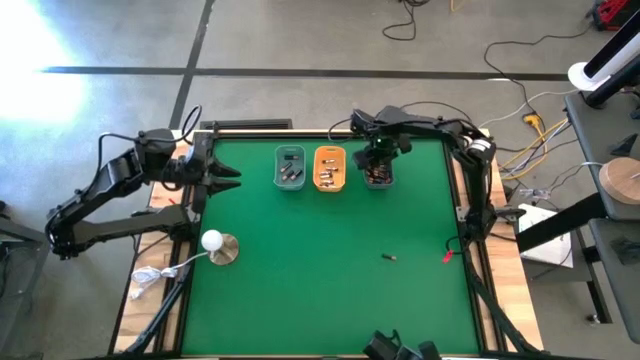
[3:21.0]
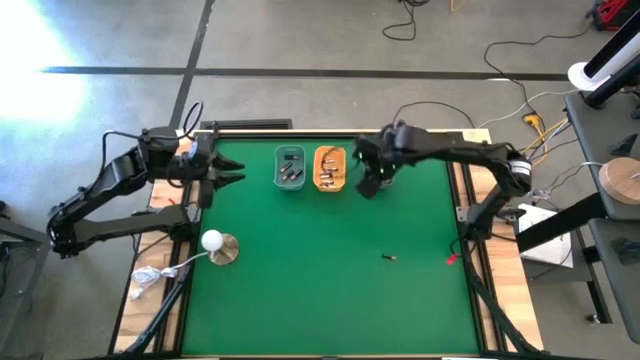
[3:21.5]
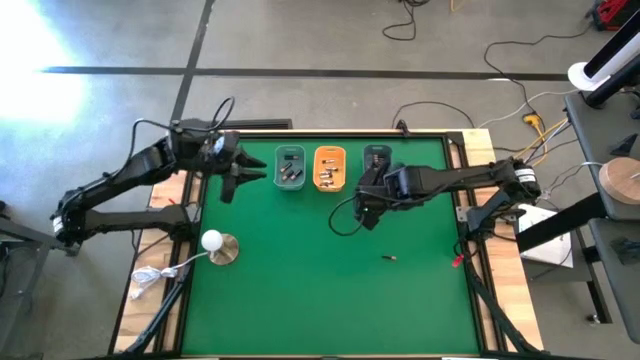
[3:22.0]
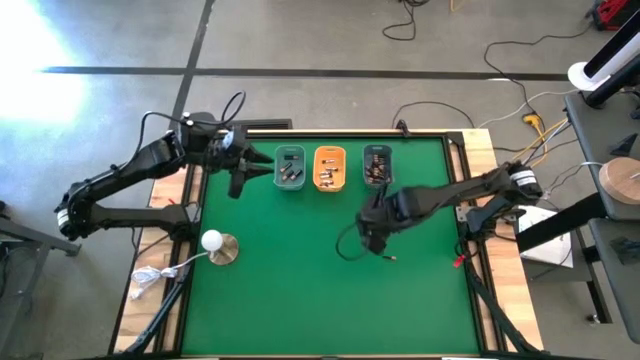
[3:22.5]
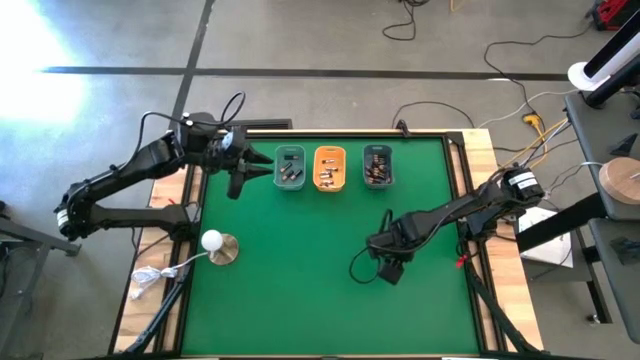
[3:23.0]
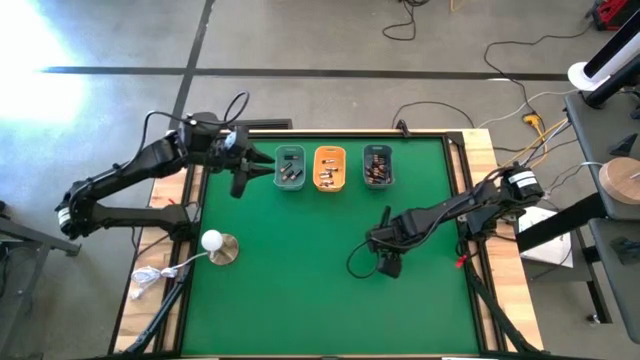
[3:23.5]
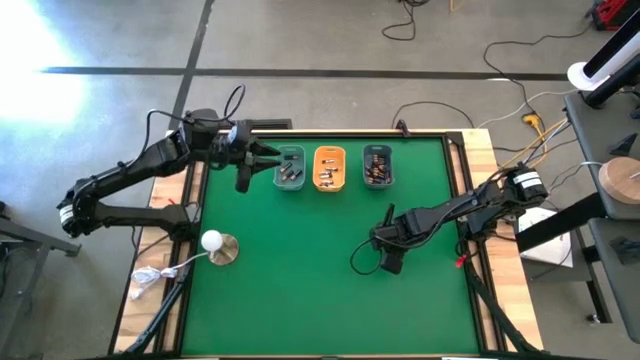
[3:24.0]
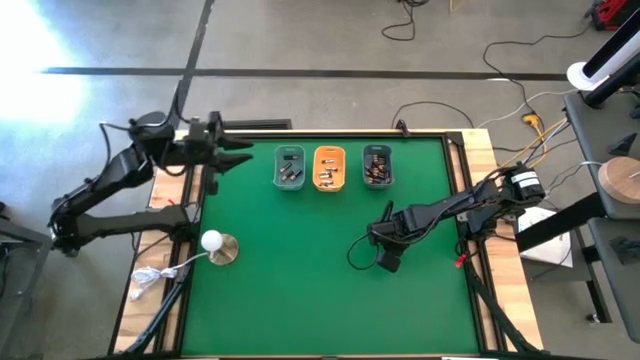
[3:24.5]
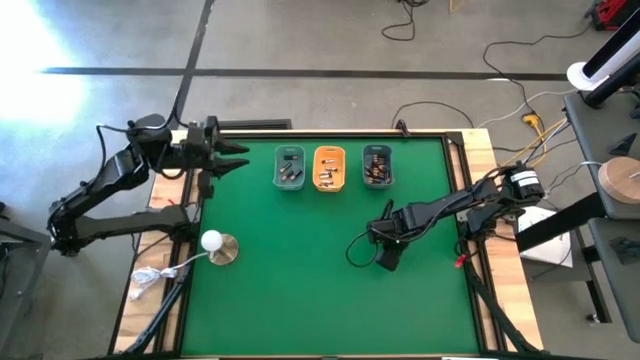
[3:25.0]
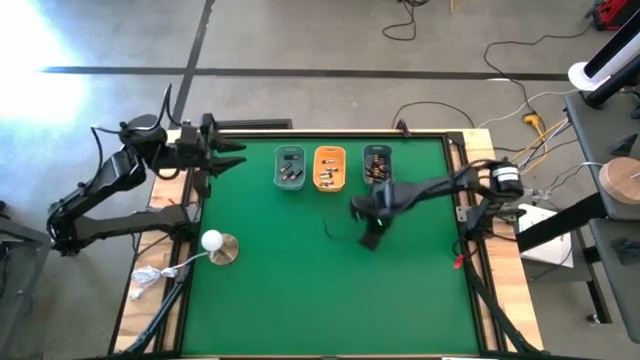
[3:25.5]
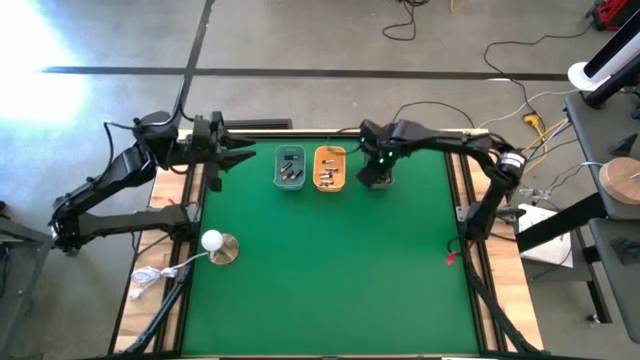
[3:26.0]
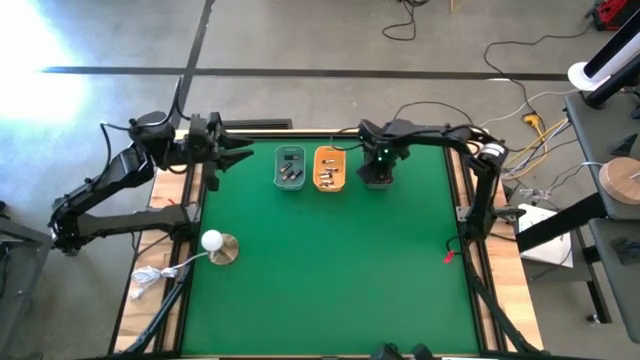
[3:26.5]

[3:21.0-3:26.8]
Task: Sort batteries
Put the small brown battery into the gray bin

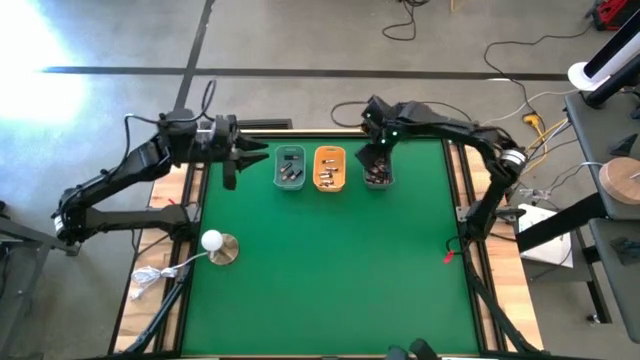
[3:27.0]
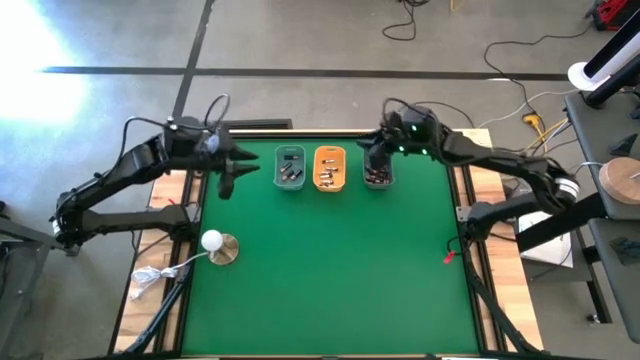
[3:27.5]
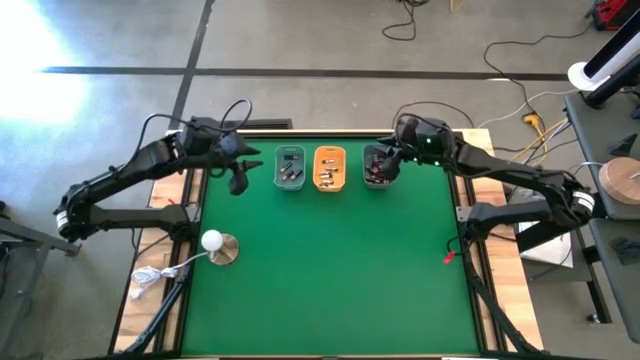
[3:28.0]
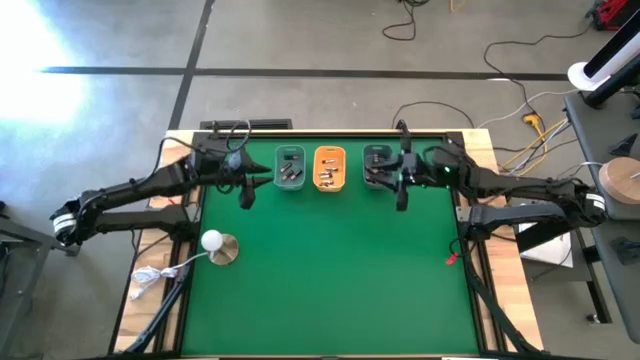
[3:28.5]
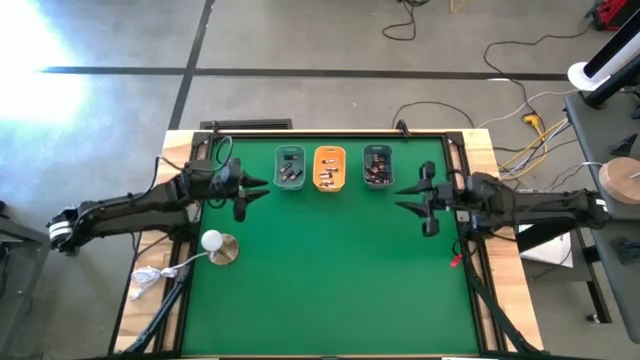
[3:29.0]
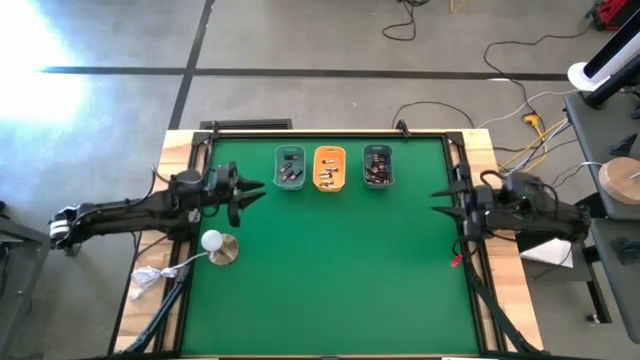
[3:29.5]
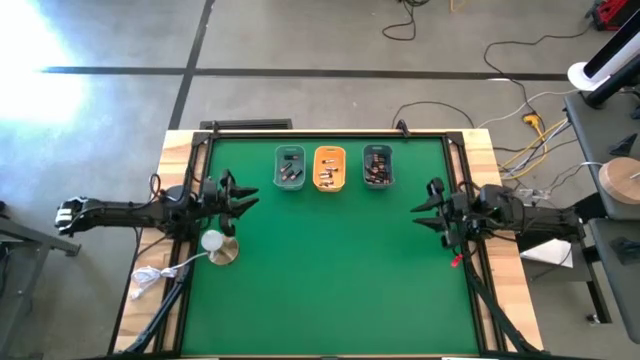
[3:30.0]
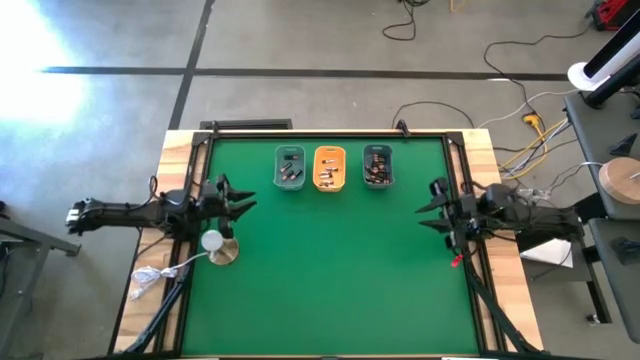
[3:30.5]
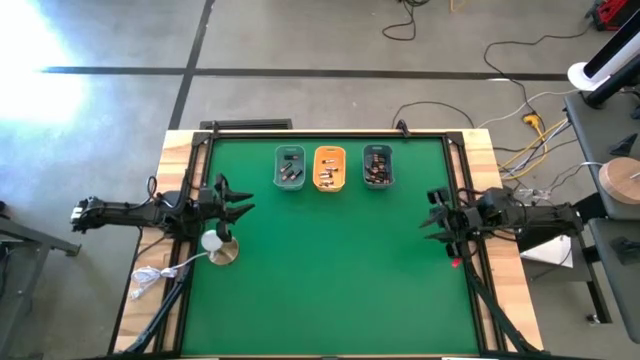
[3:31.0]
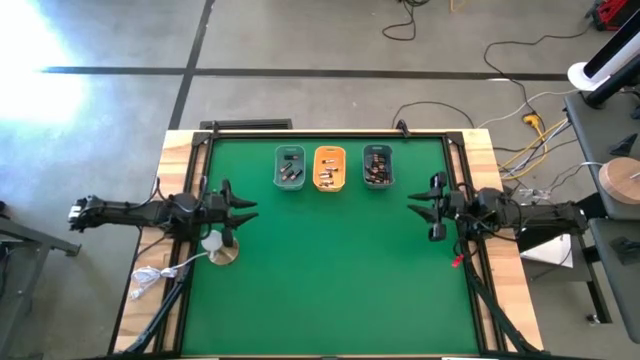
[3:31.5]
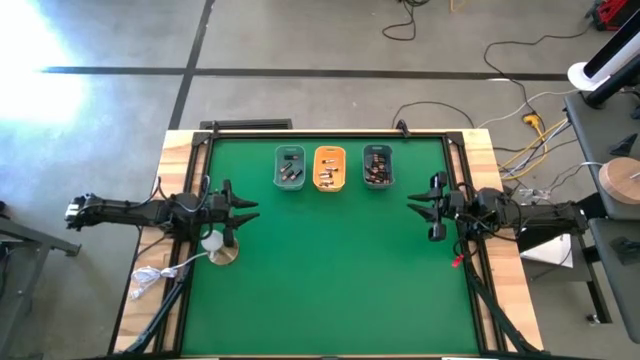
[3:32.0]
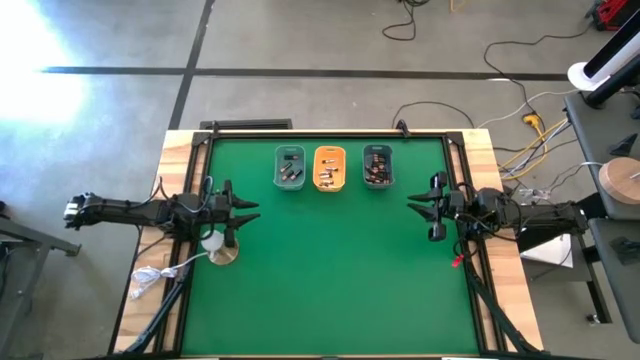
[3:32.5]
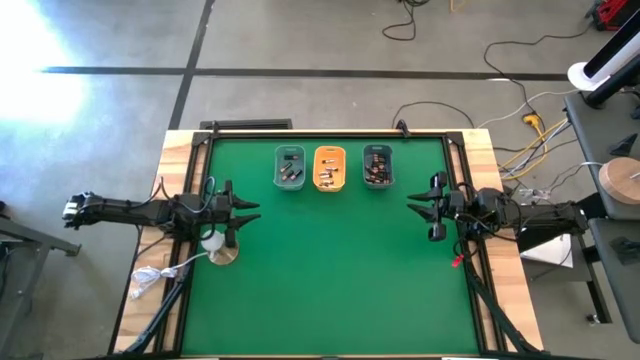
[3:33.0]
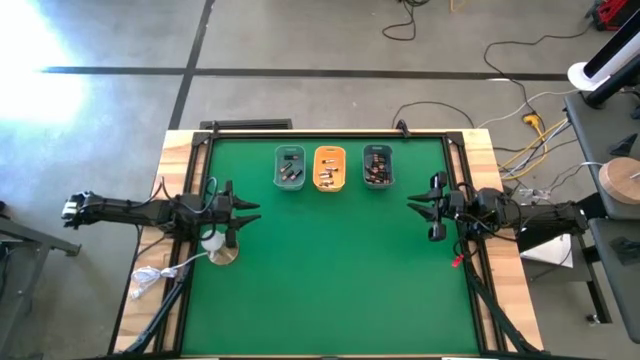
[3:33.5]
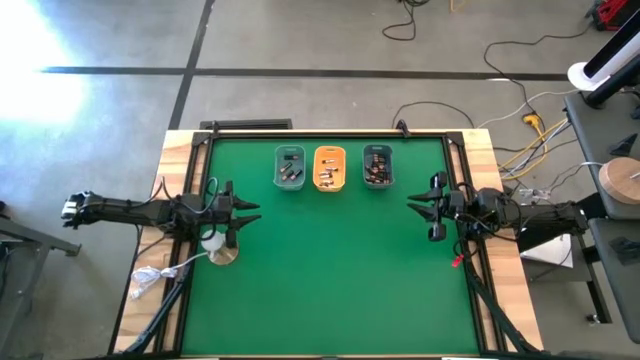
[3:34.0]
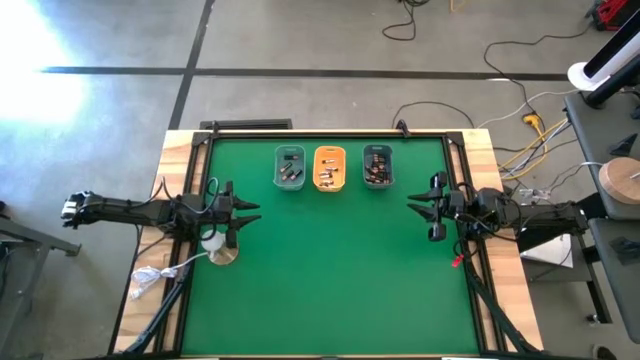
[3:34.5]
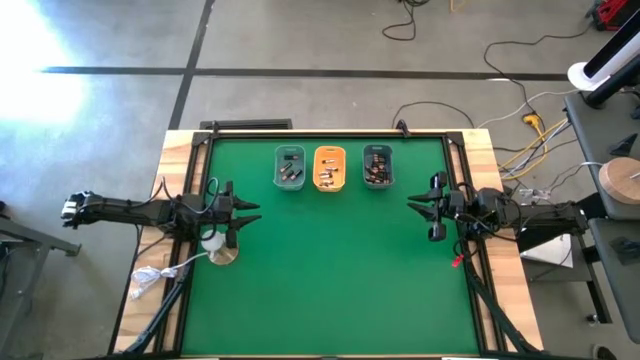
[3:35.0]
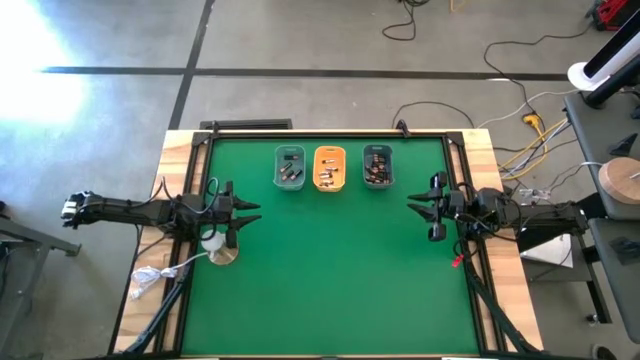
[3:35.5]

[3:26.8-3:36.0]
Return to home position

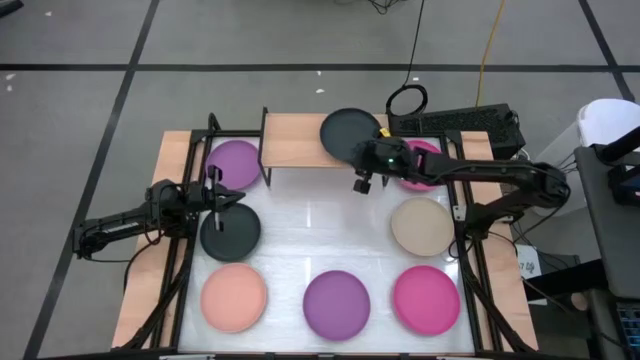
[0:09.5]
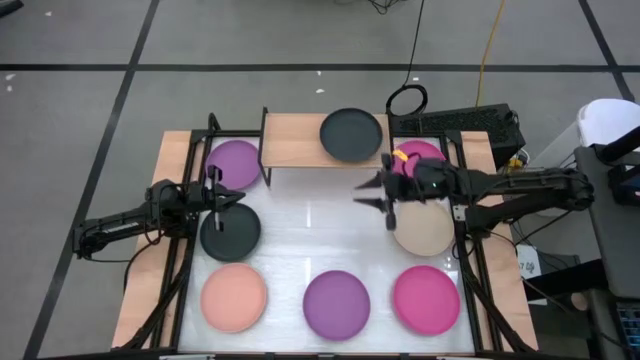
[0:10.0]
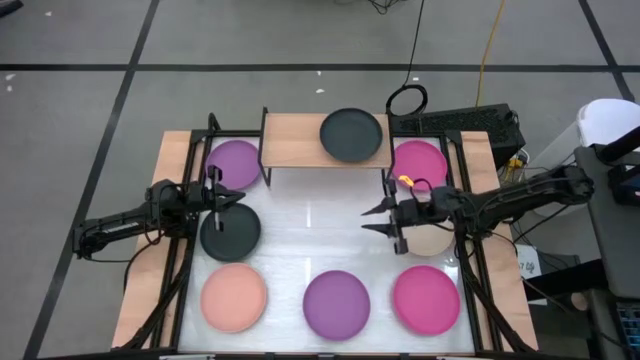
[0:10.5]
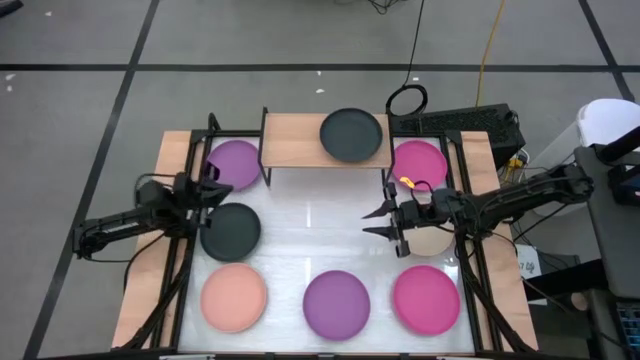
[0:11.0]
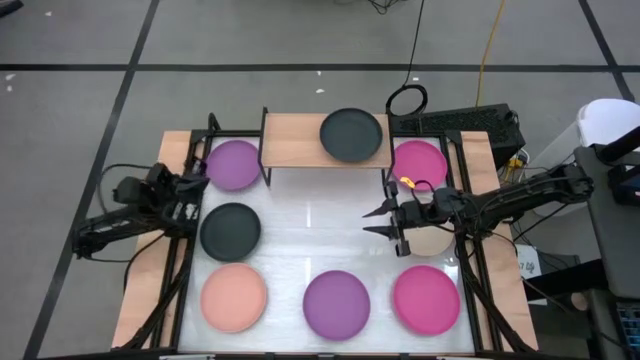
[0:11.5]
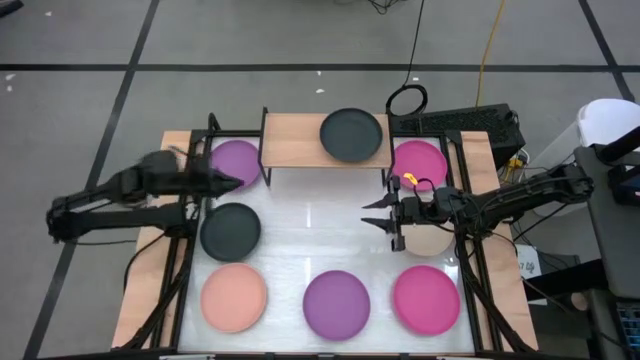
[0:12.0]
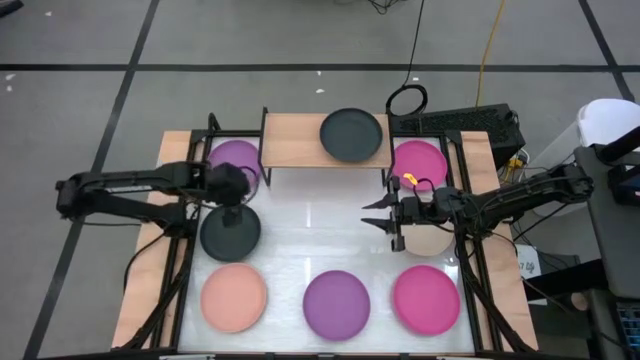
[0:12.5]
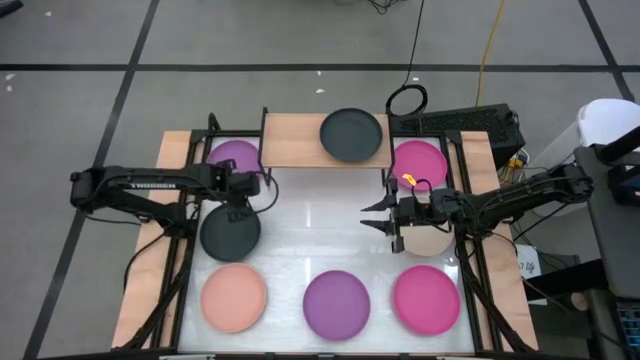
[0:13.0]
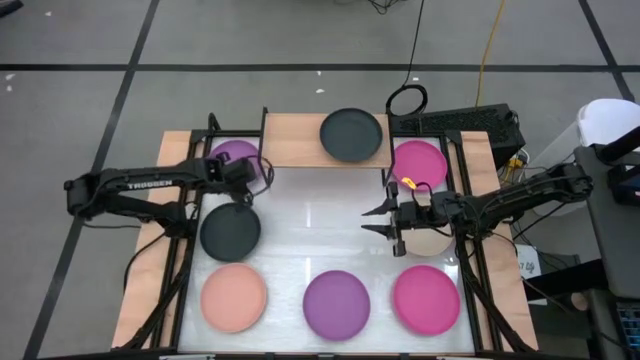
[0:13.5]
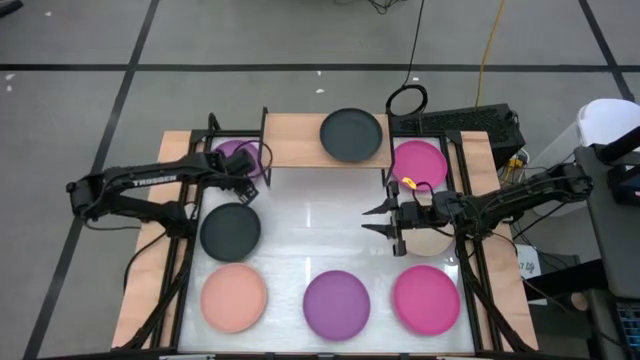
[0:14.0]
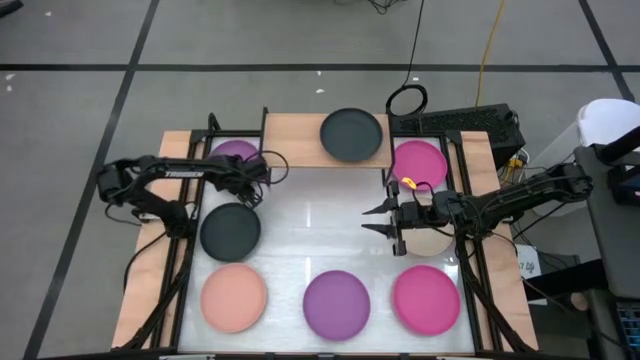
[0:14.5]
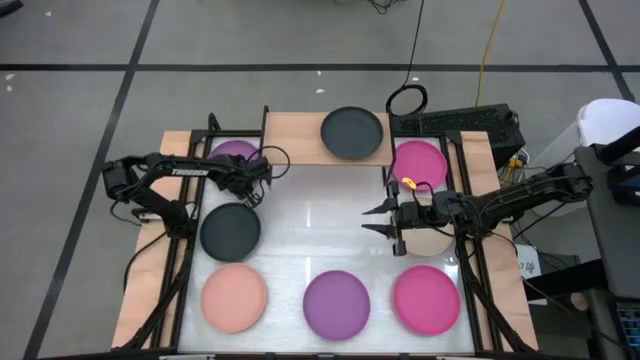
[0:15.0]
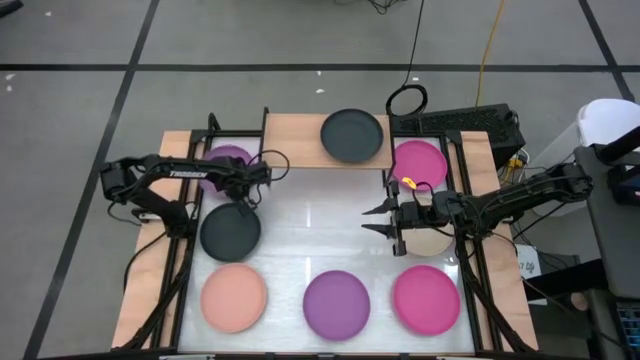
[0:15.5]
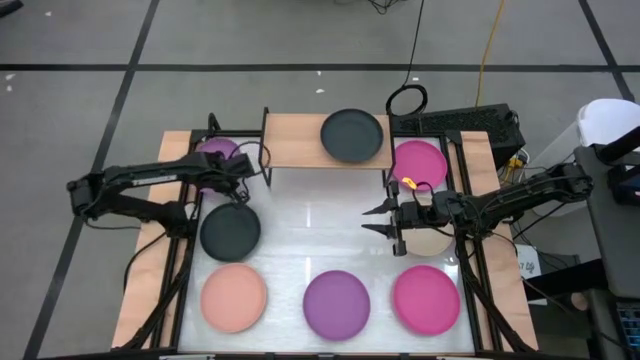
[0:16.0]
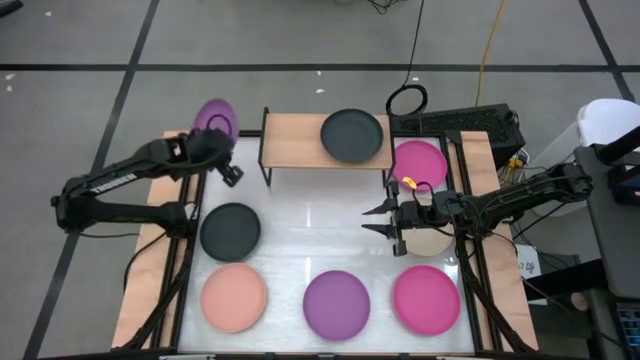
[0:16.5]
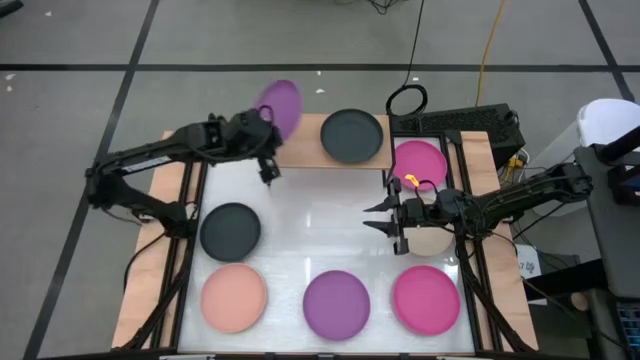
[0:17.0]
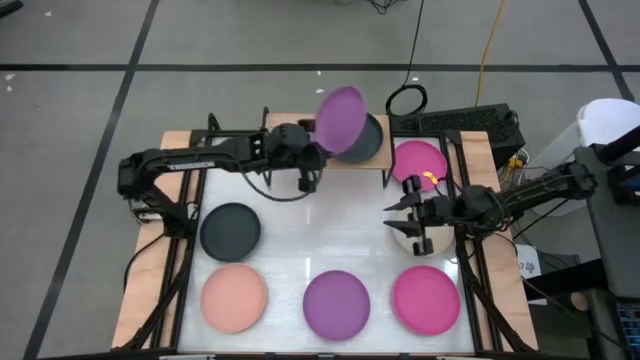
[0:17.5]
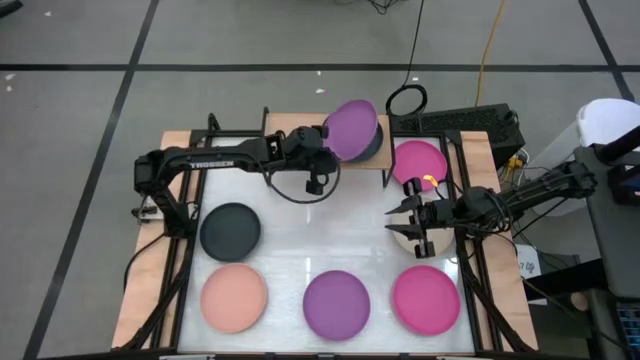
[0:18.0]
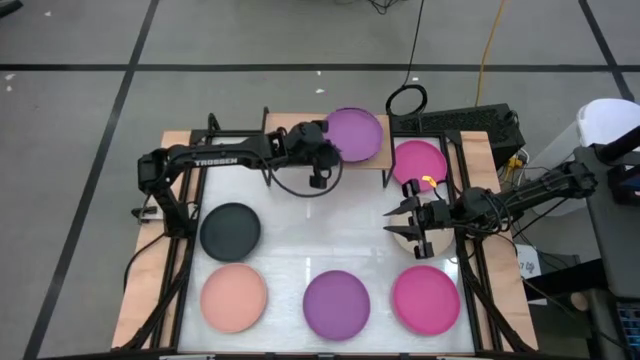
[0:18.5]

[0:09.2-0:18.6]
Task: Place and stack plates onto a shelf
Stack the top violet plate on top of the black plate on the shelf
